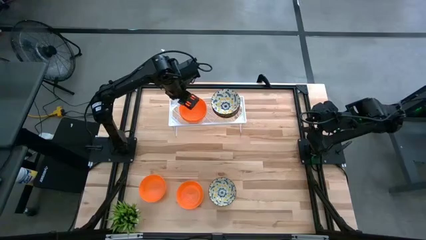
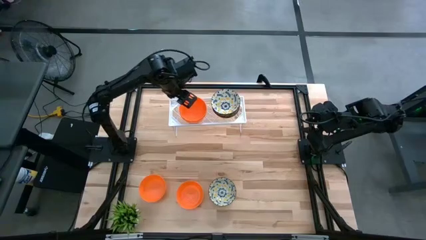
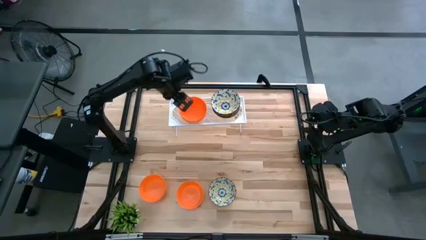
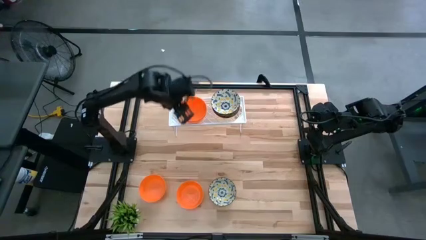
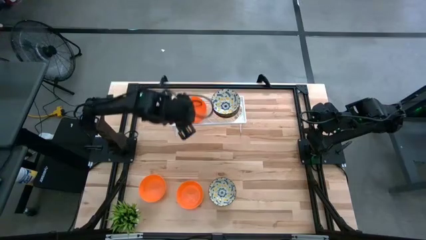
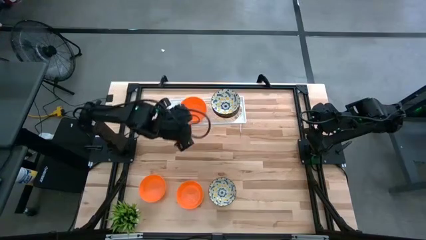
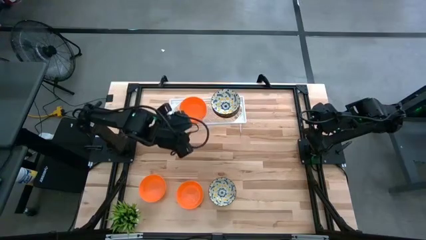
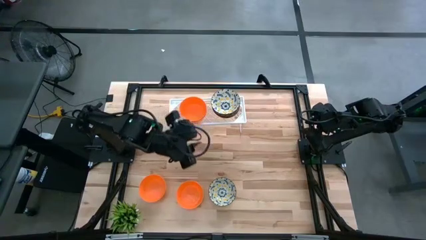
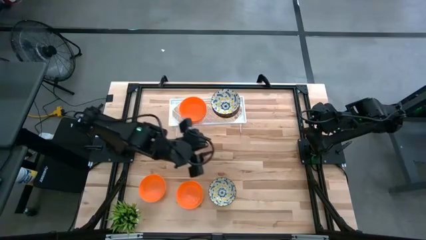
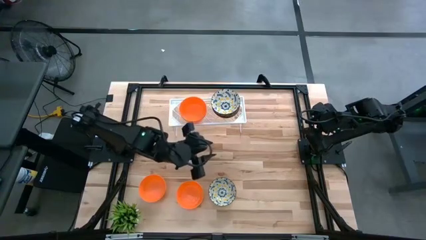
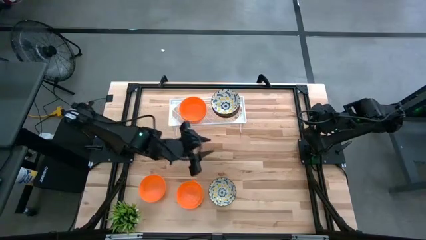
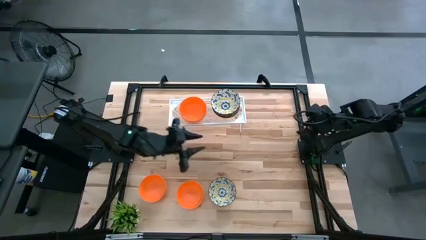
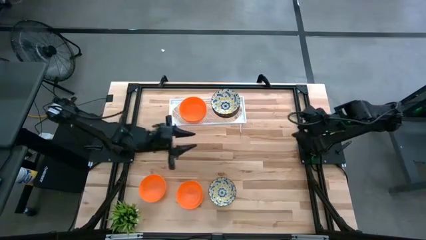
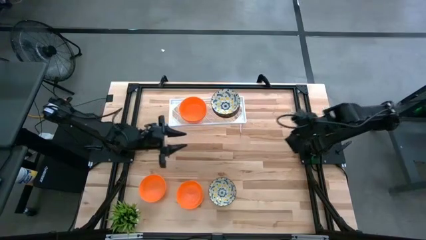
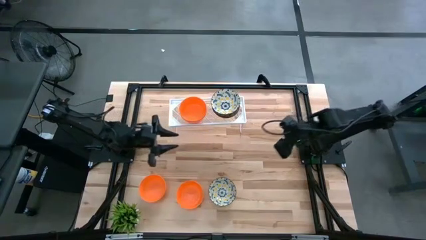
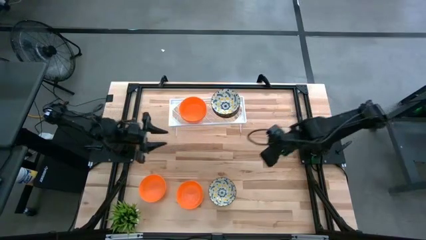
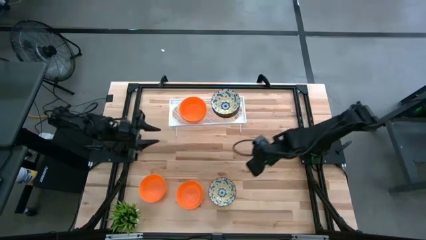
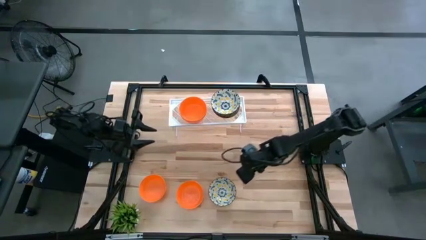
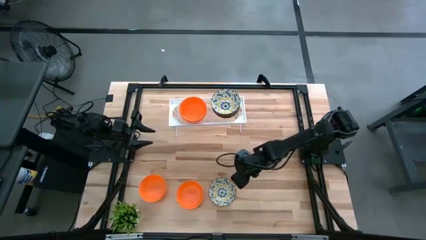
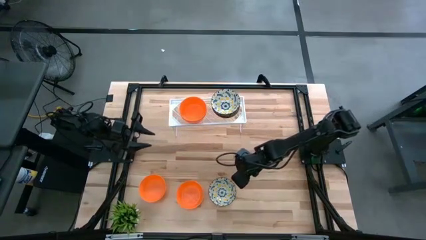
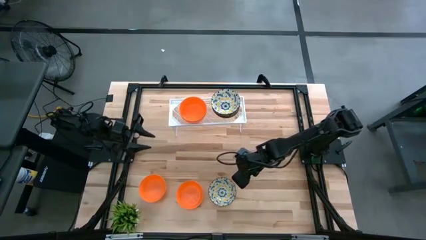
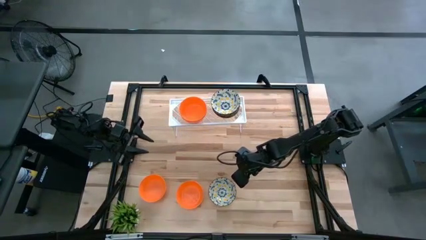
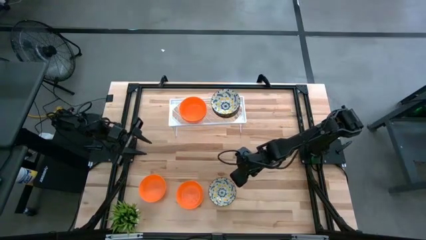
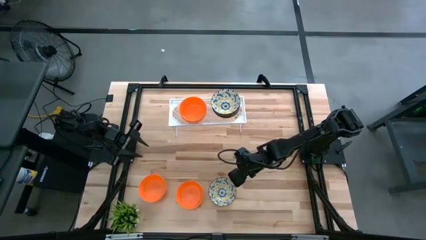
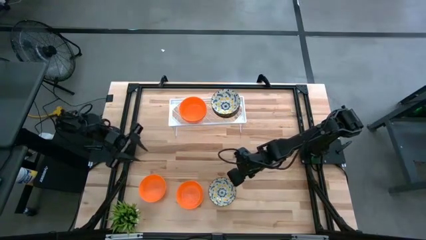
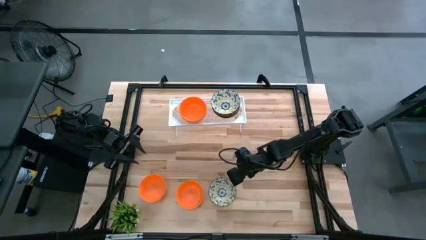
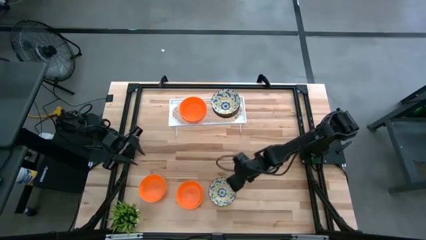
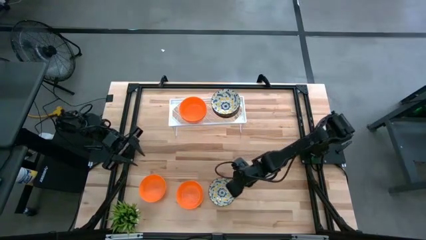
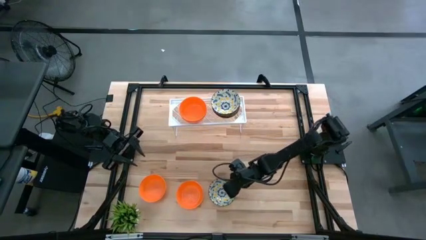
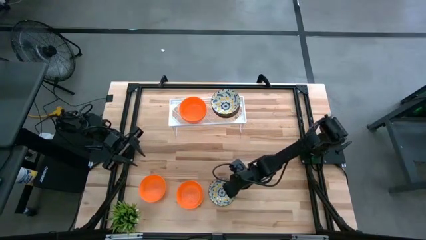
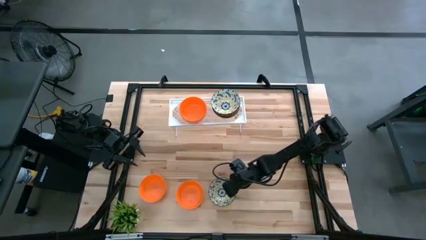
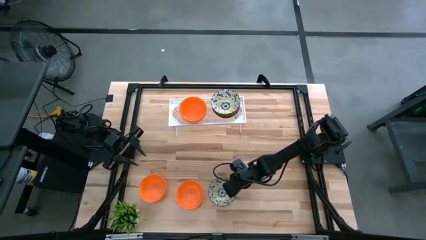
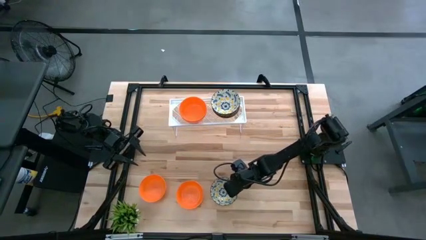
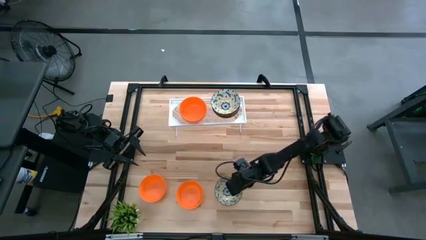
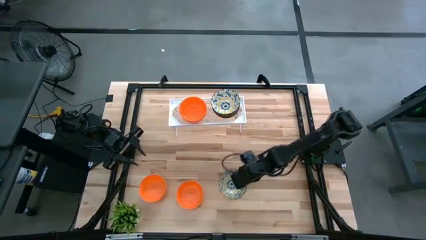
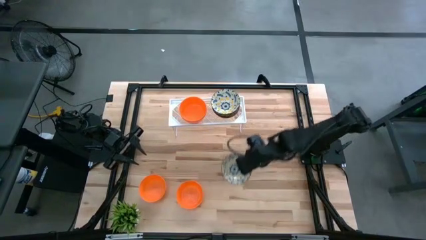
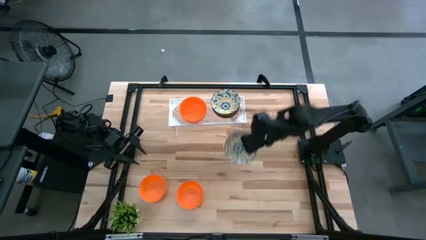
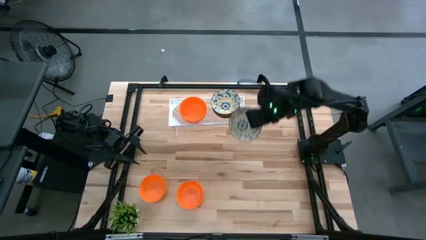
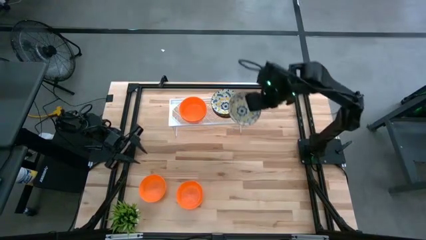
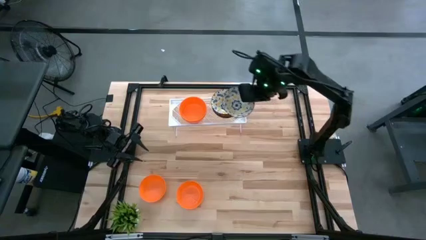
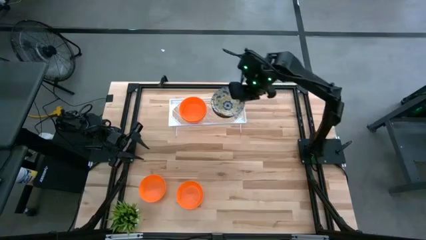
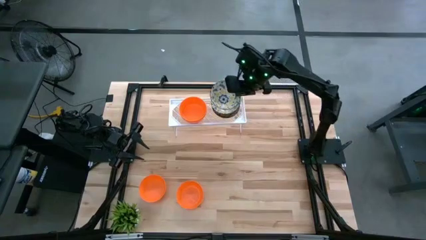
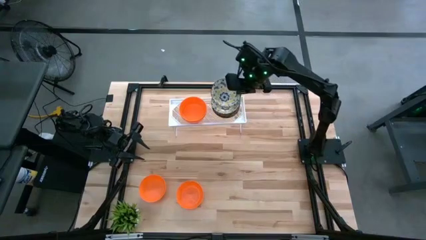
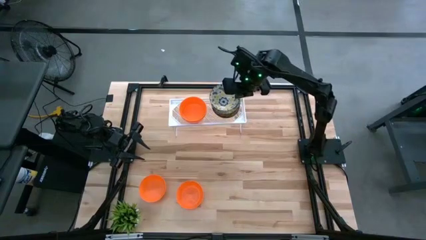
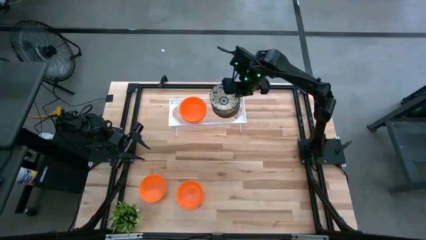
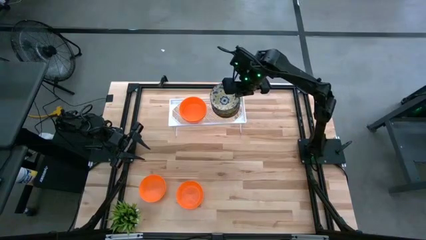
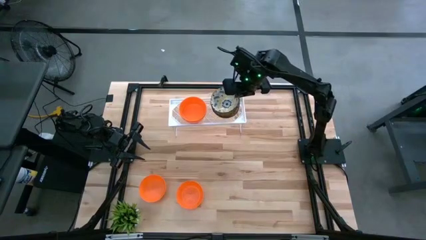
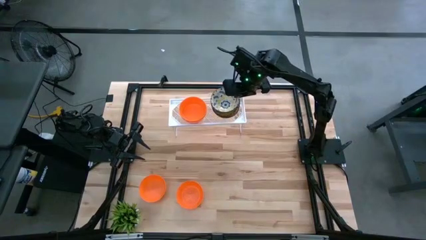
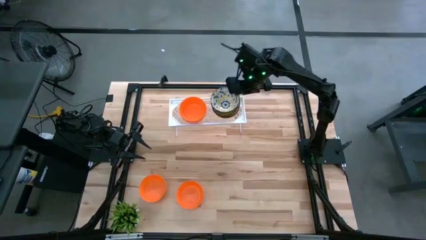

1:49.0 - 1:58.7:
Task: Pick & Place Mini bowls
Stack the white patterned bowl on the other white patterned bowls on the shelf

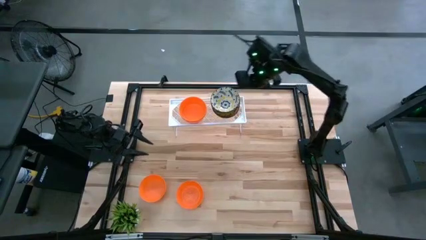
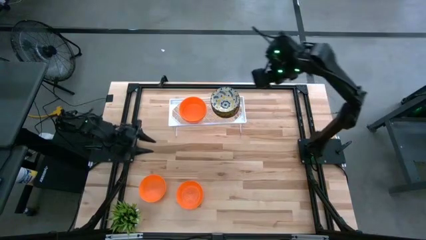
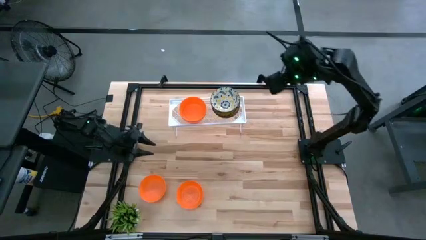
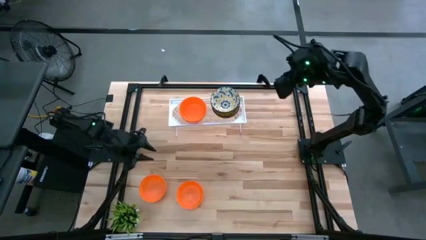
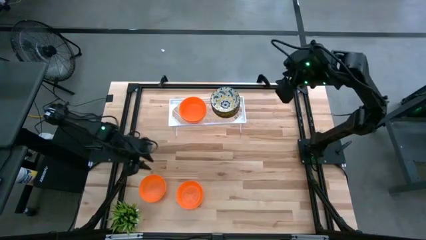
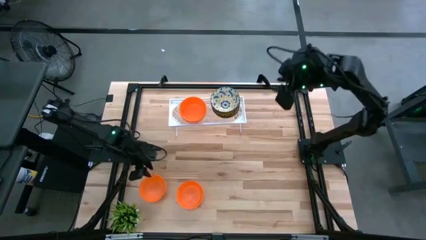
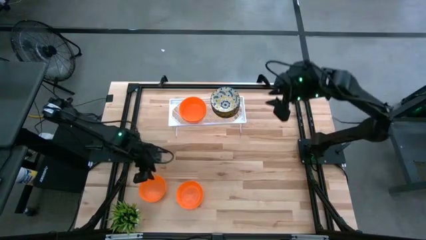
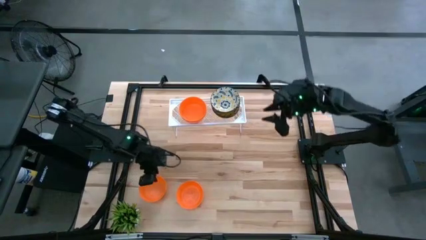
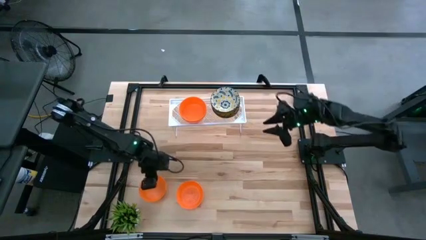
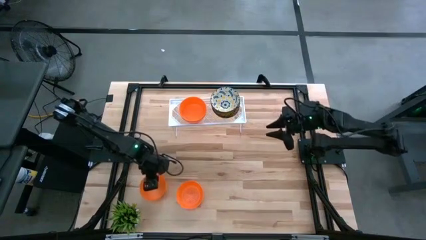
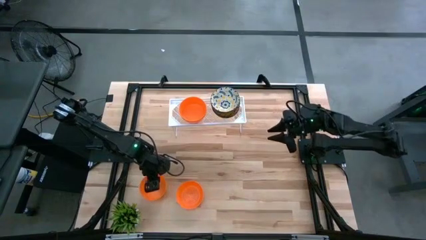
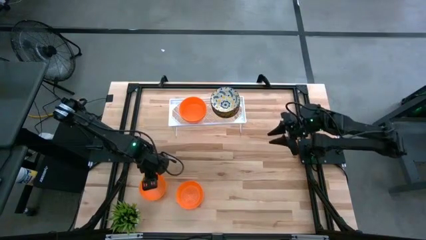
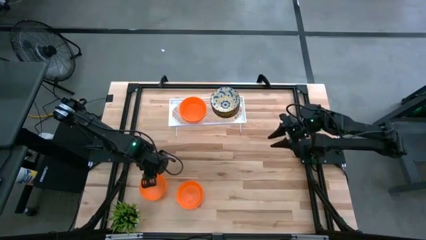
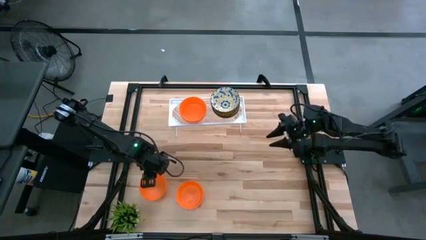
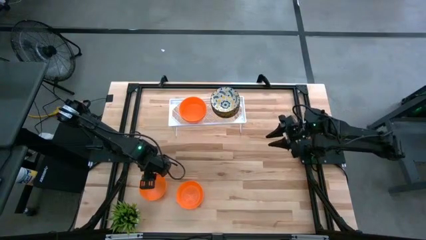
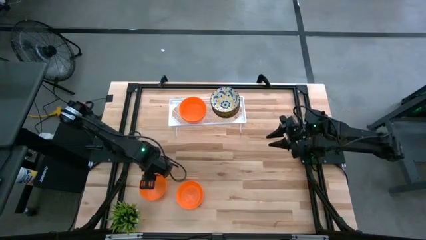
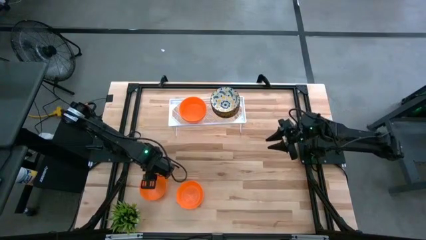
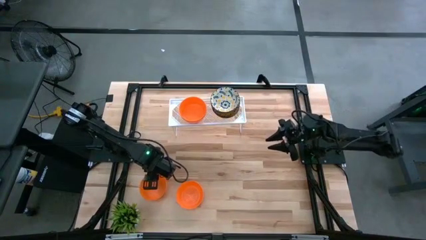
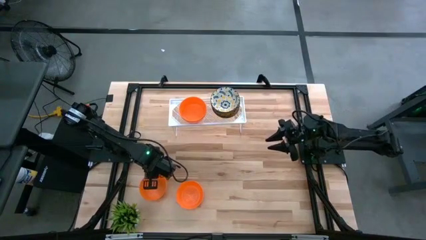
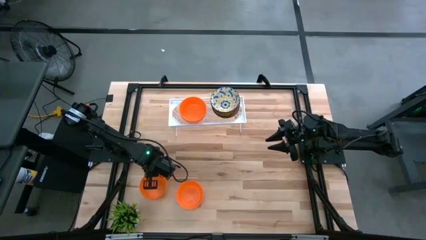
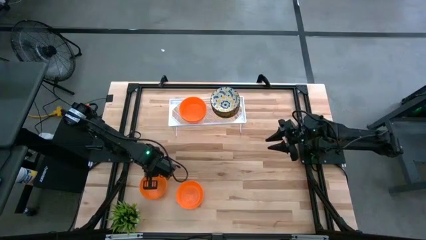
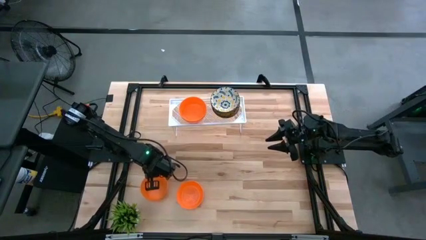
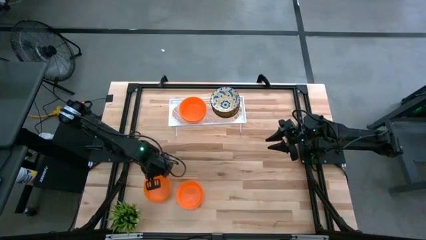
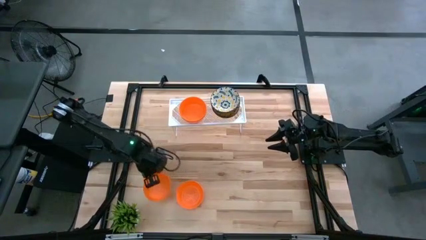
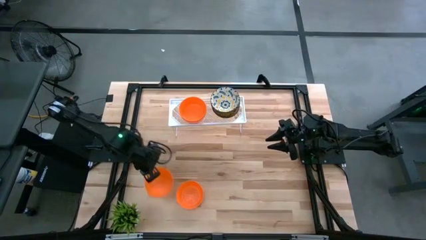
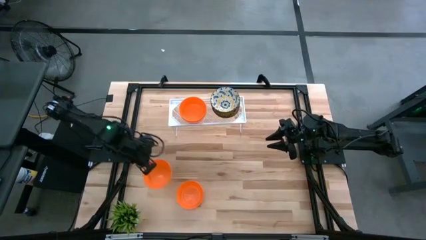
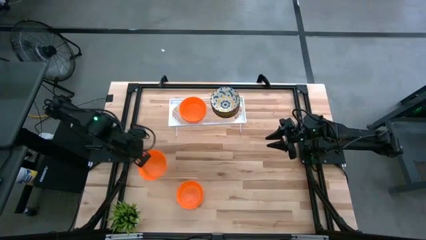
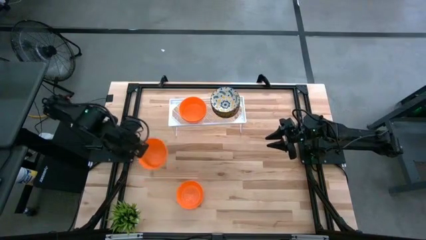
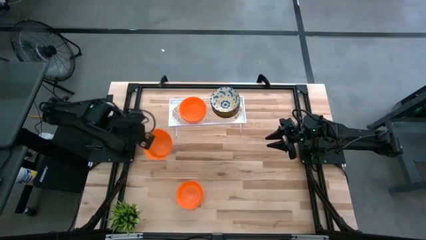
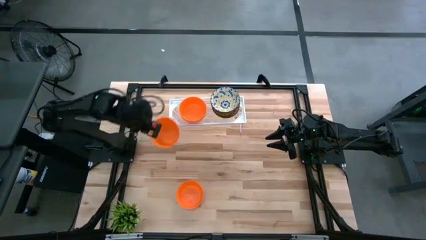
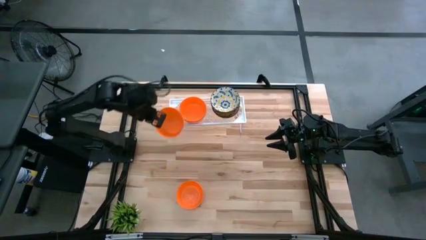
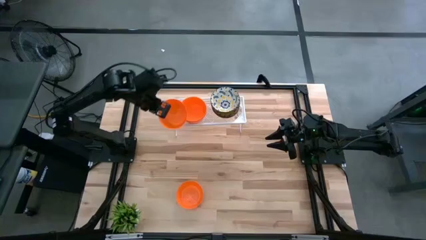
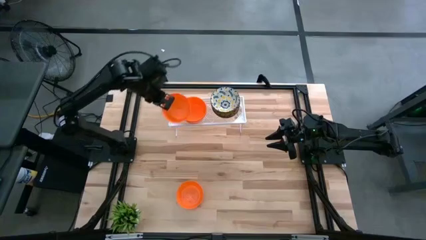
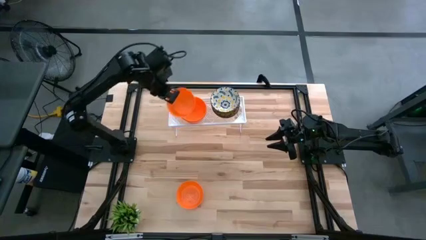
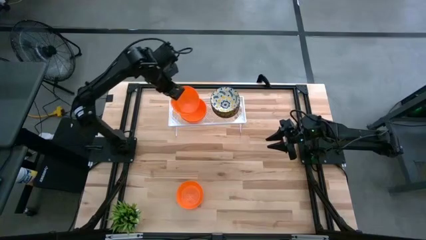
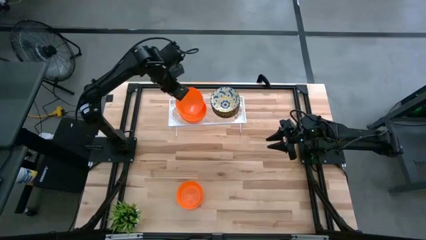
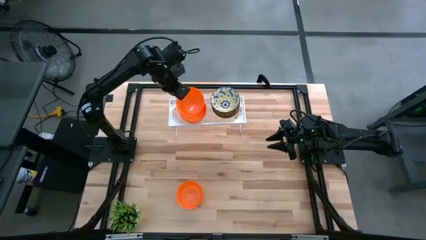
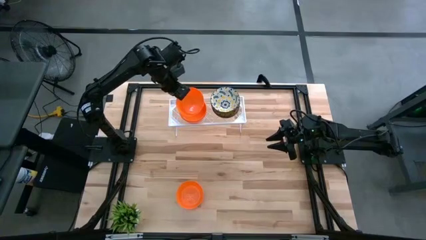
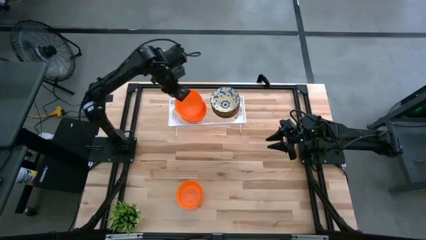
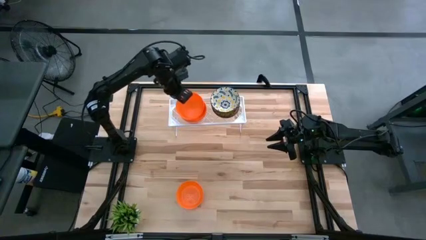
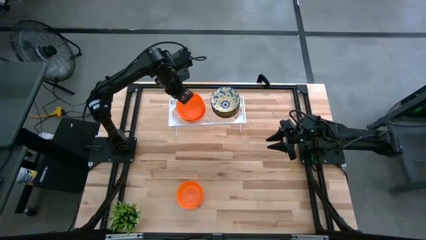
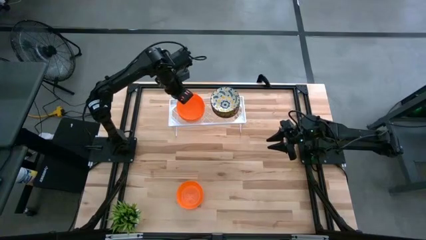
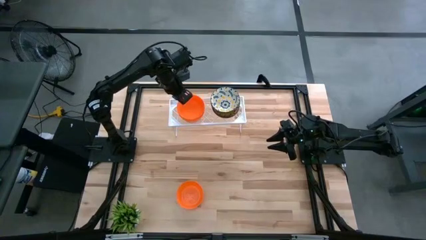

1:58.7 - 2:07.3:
Stack the orange bowl on the other orange bowls on the shelf
